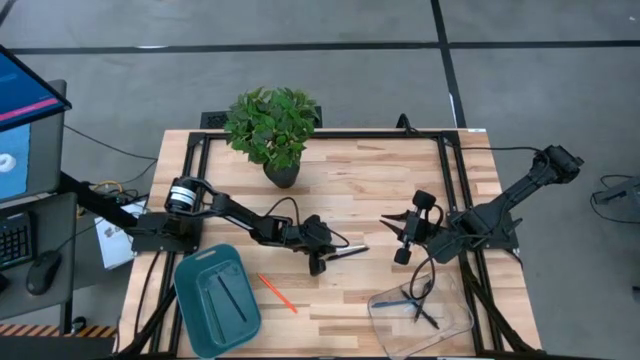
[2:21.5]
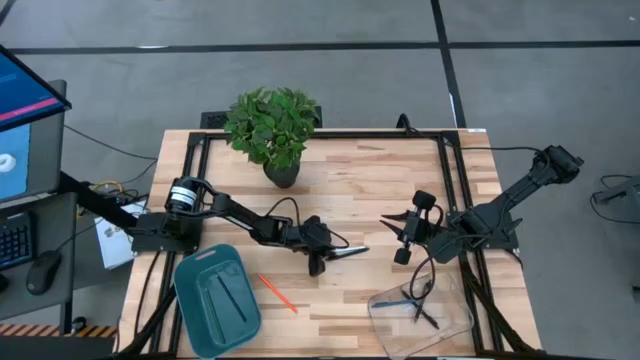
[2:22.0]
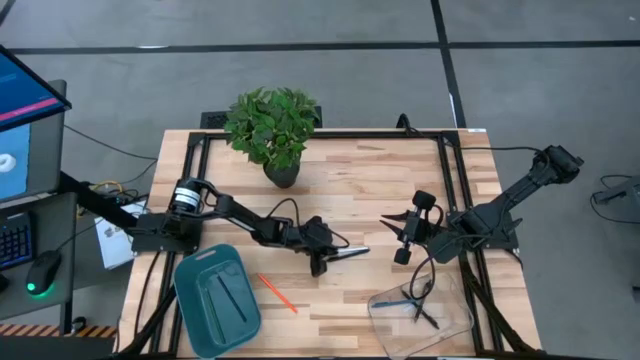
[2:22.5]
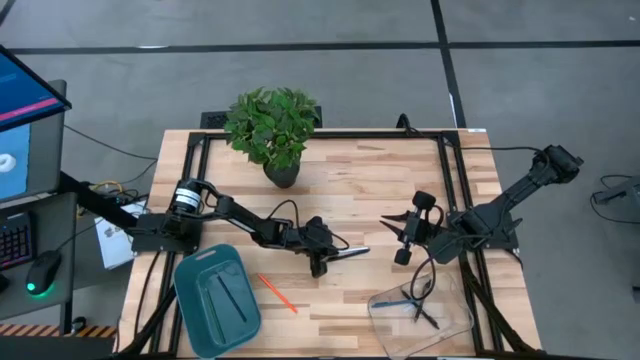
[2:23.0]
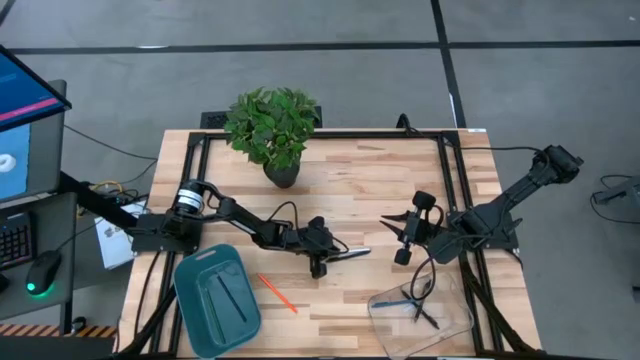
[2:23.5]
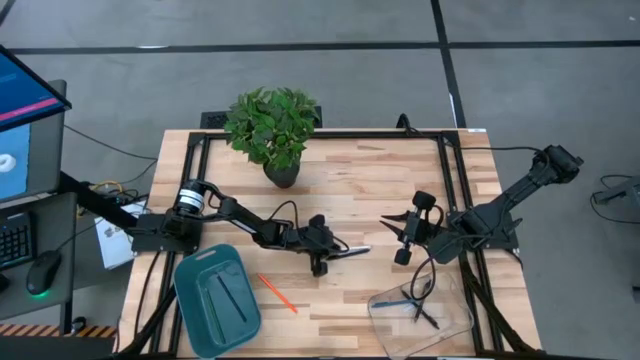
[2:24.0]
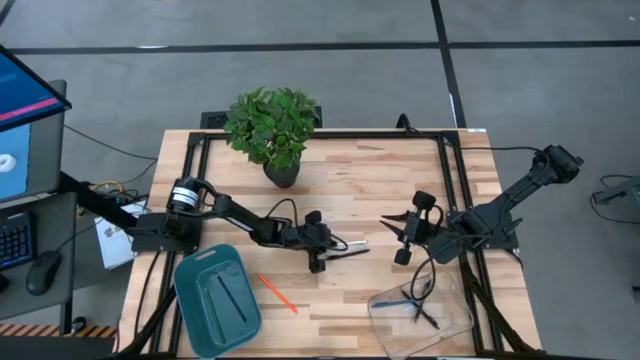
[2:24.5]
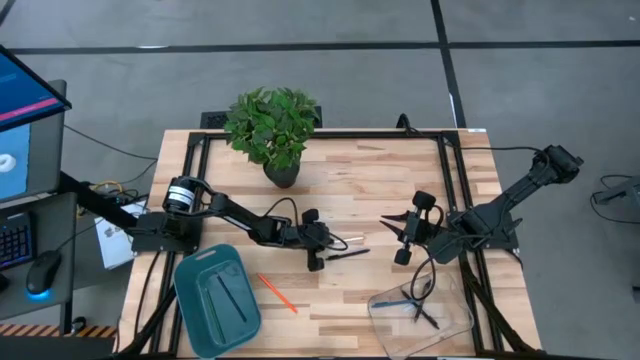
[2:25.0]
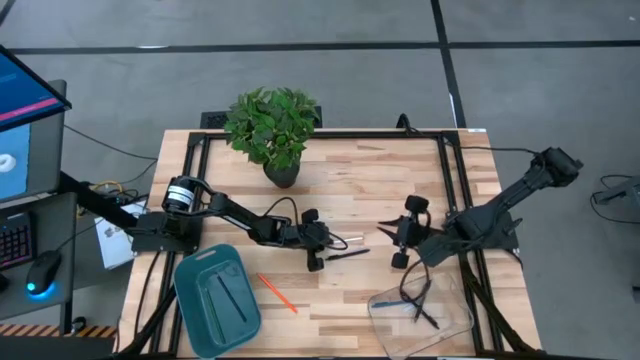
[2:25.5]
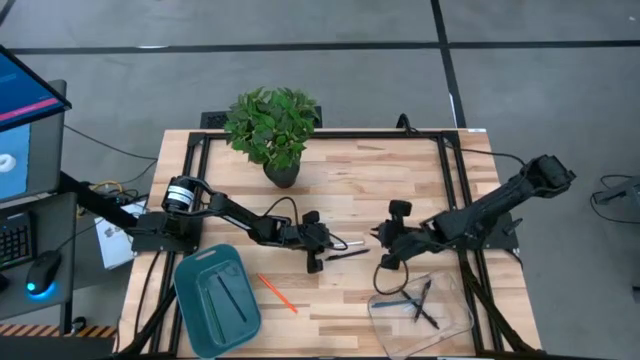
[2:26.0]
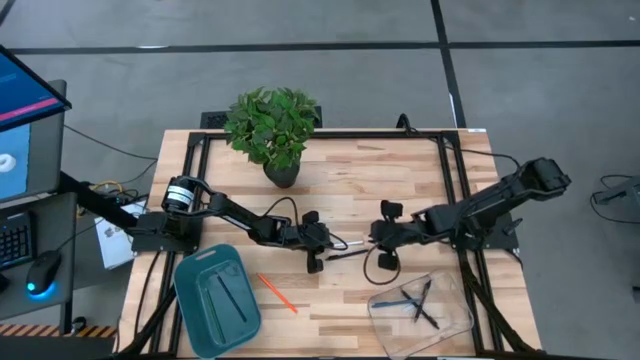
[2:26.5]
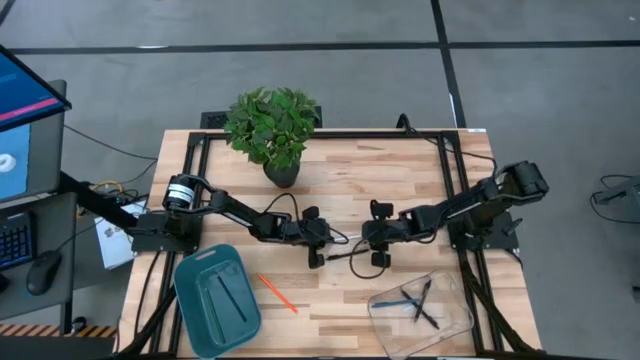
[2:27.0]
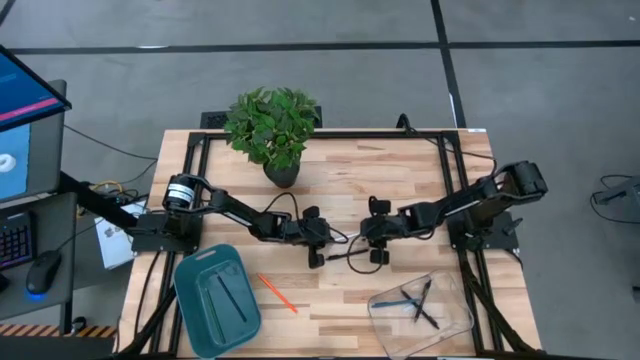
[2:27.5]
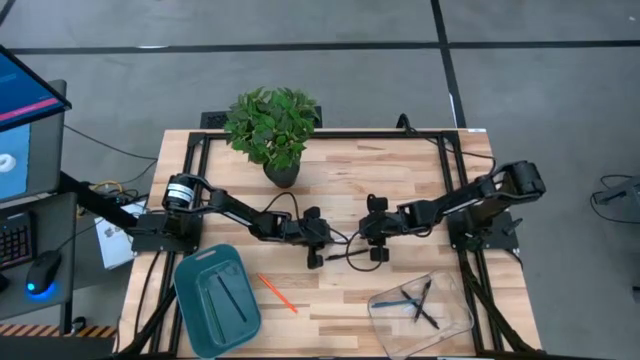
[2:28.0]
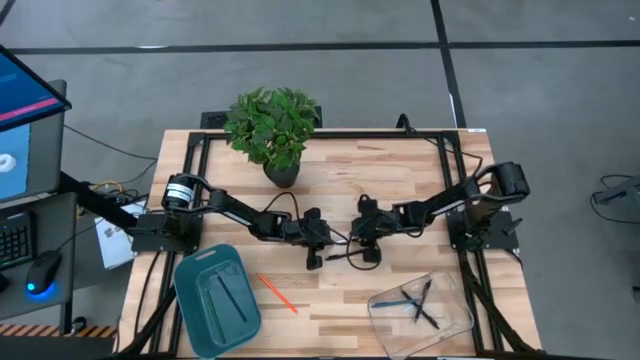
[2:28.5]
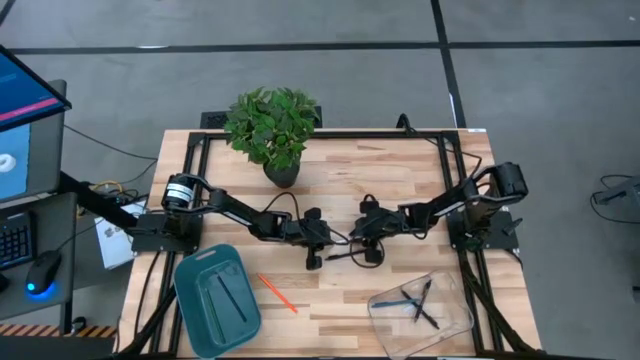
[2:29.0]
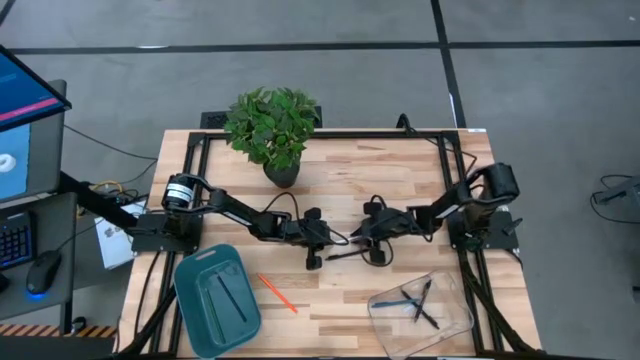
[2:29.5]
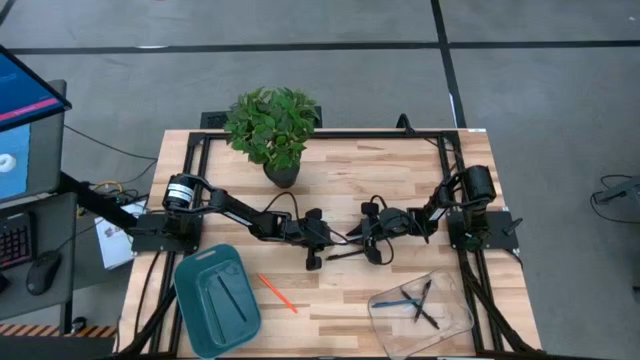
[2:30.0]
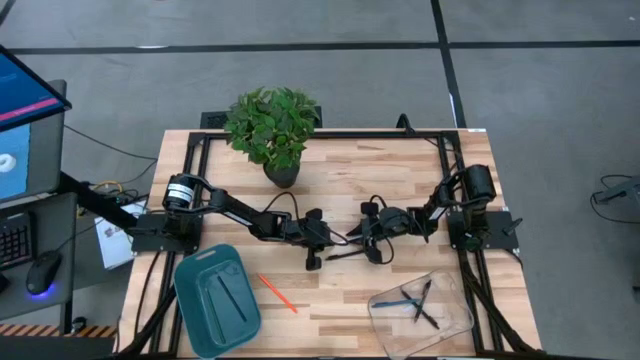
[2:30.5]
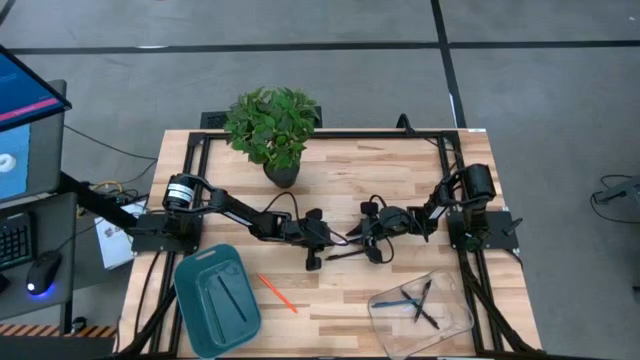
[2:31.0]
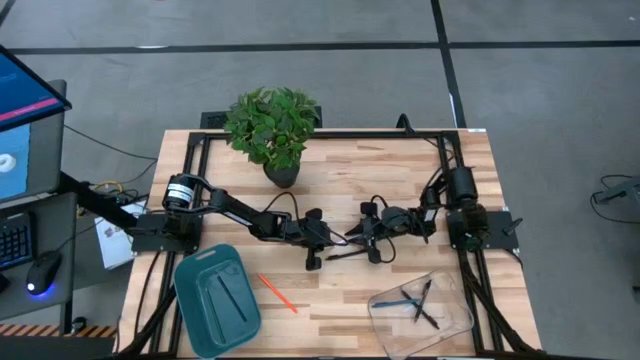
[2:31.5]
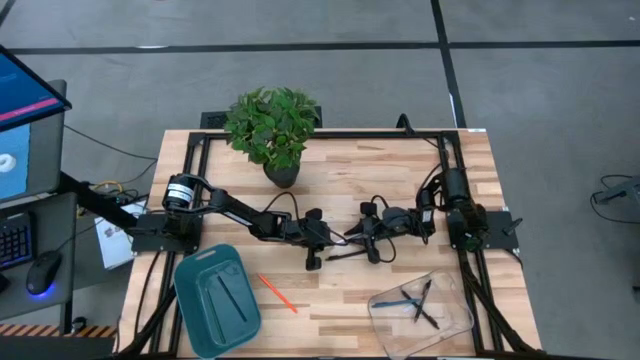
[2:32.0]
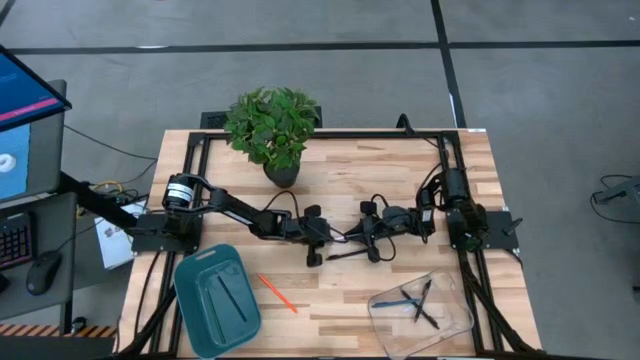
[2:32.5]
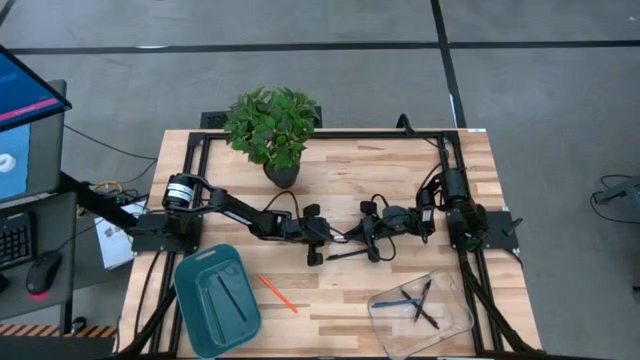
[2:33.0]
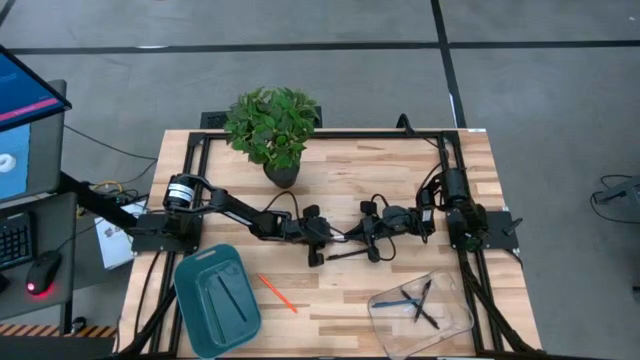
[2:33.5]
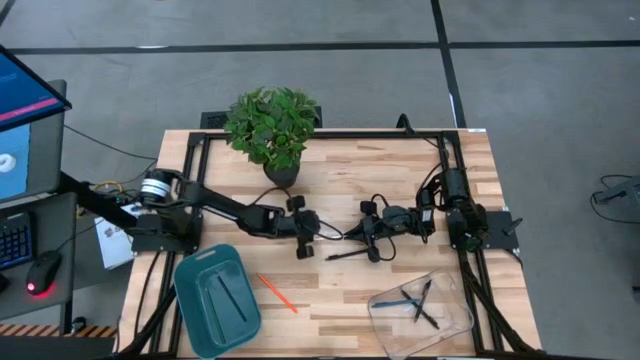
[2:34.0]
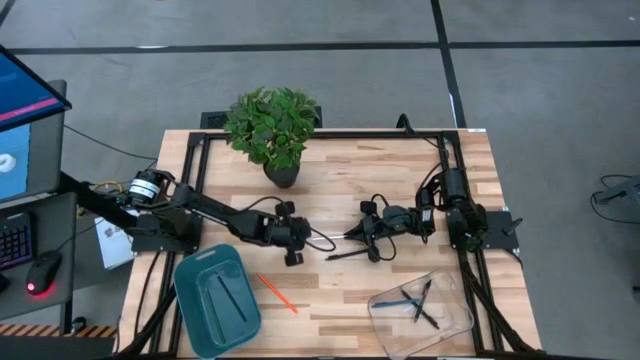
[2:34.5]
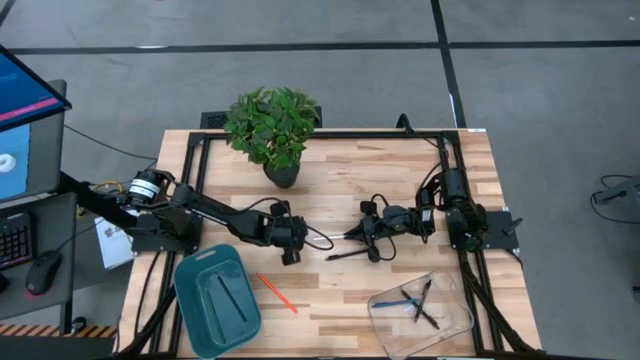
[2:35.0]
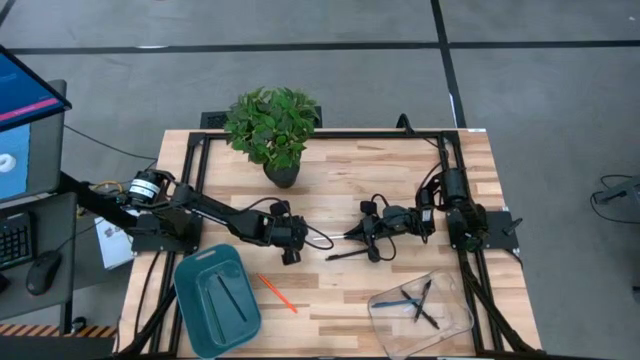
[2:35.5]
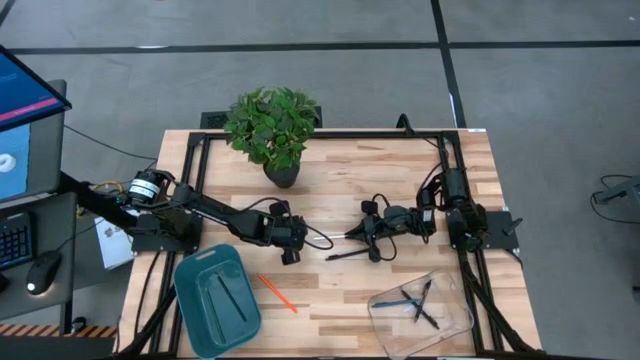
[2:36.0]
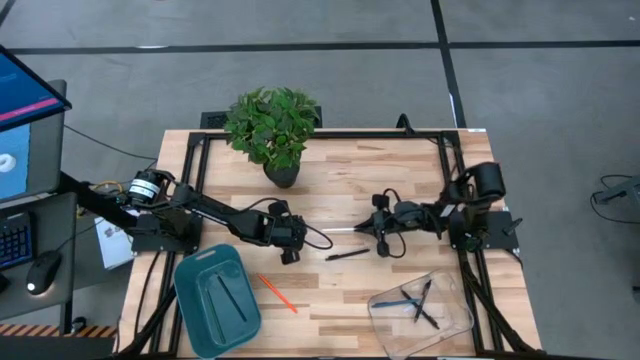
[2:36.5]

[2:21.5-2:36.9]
Task: Sort pens & pencils
Put the white pencil into the blue bin

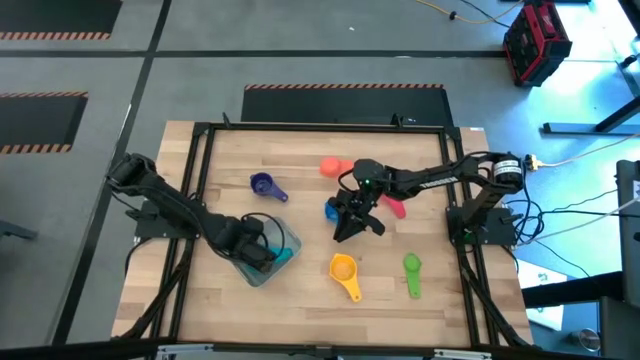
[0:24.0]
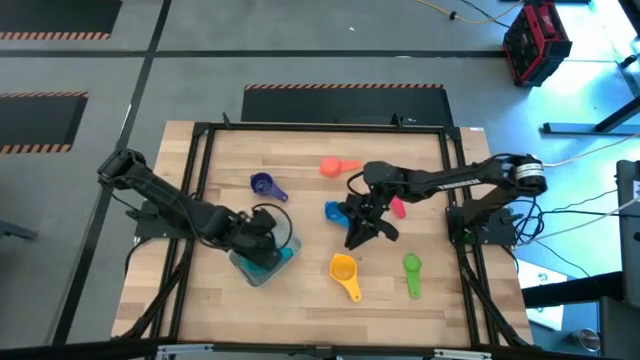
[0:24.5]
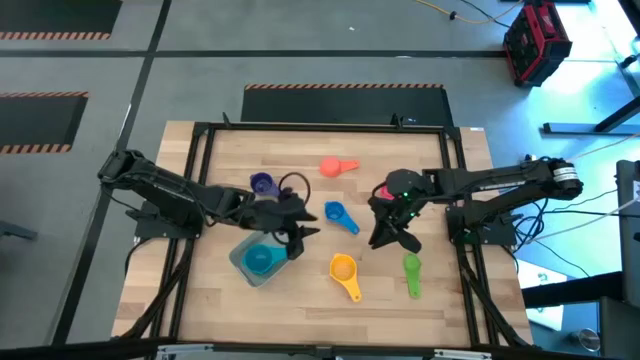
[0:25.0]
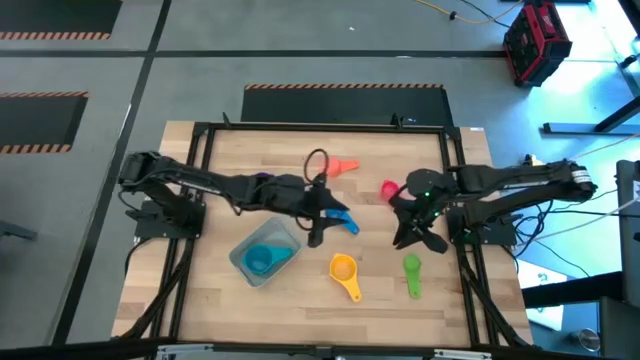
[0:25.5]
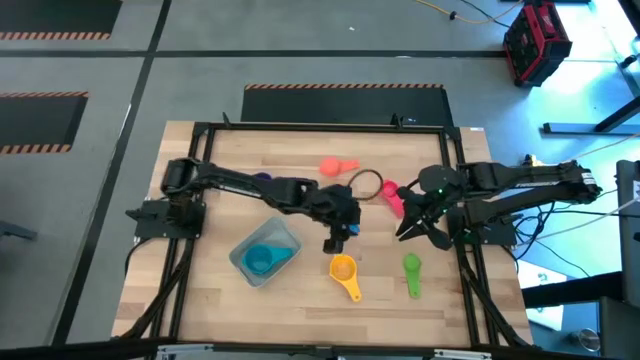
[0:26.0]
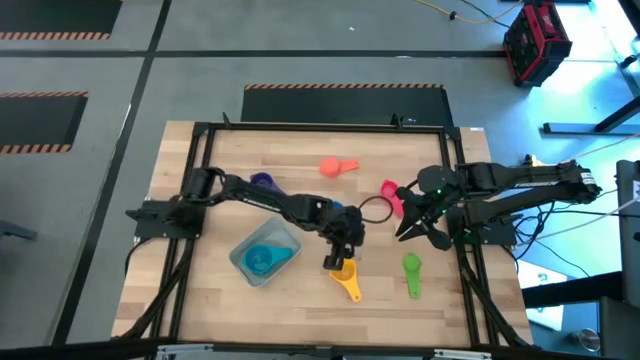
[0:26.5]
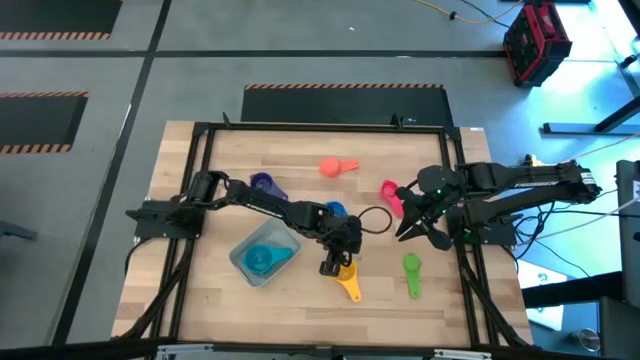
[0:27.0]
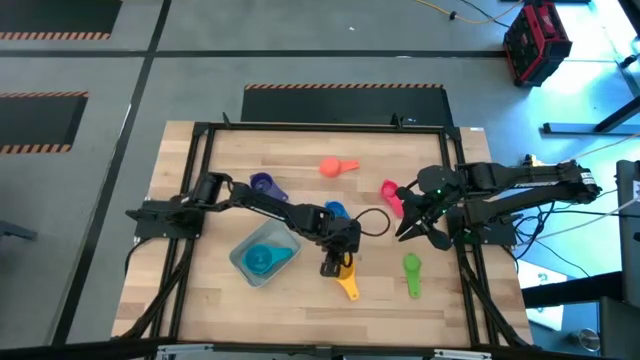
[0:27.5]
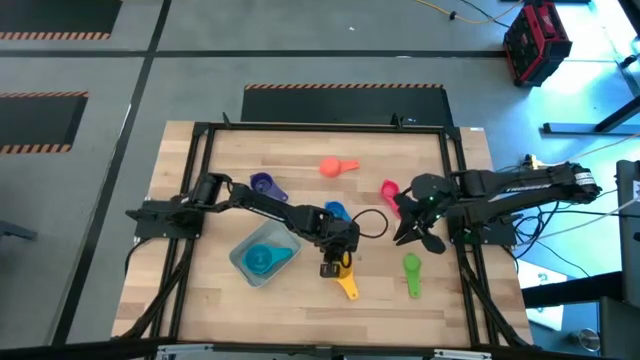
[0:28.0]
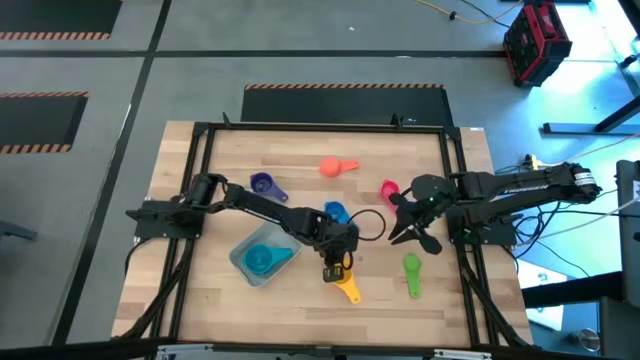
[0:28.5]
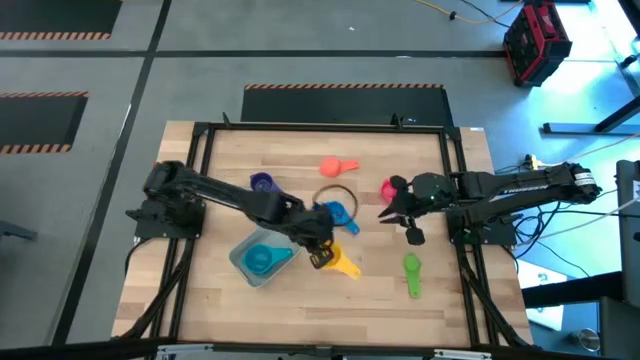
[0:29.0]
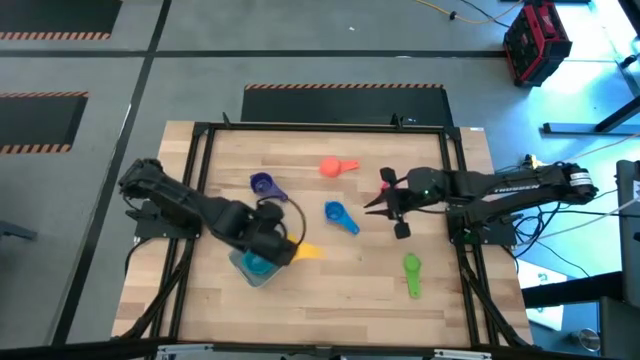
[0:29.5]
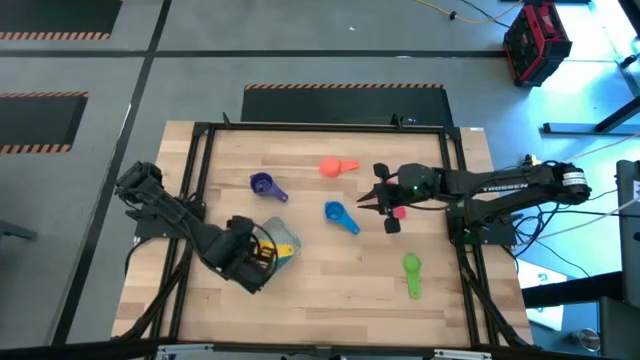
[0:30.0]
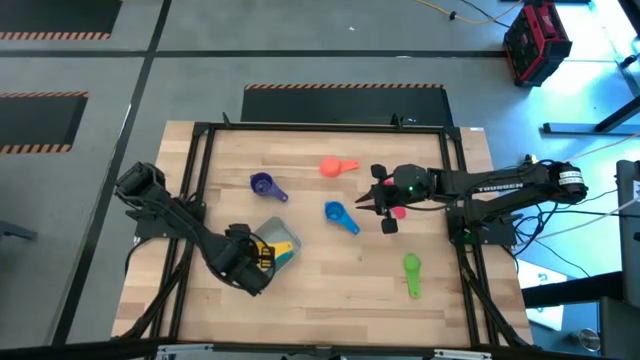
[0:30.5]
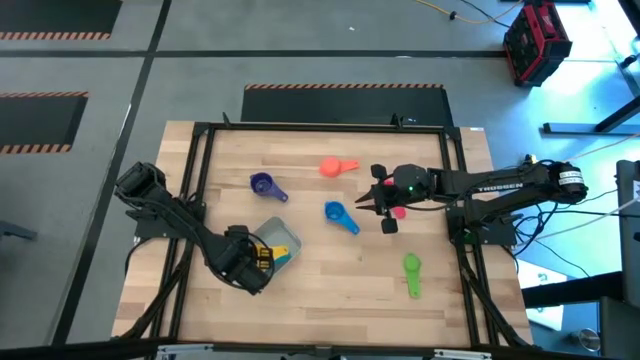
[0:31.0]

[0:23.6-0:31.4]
Task: Nest measuring cups in basket
Stack the yellow measuring cup on the light blue measuring cup in the gray bin
